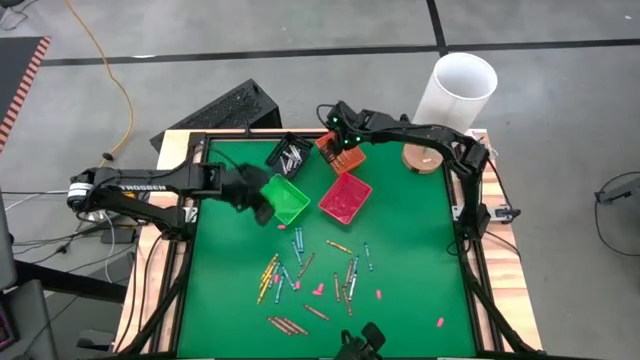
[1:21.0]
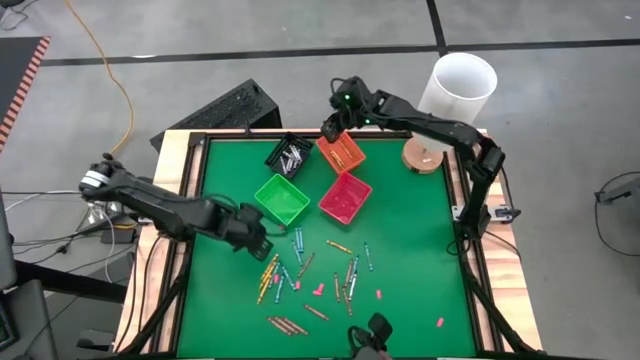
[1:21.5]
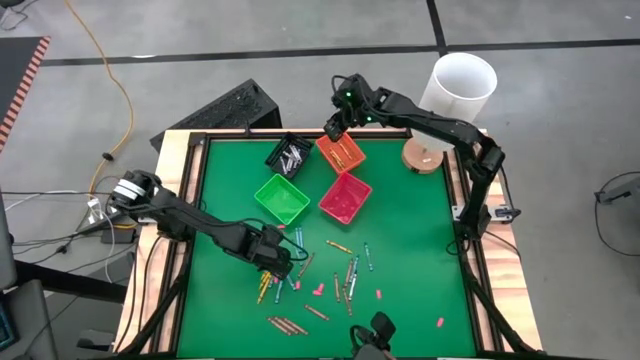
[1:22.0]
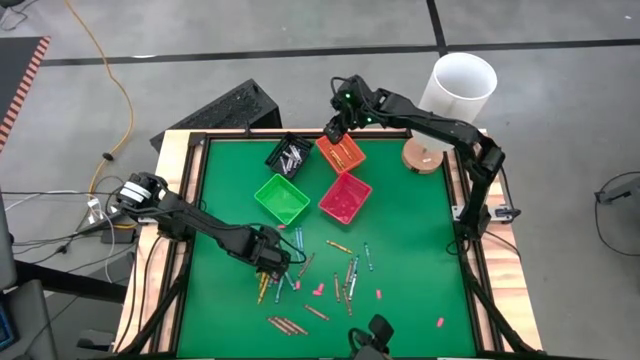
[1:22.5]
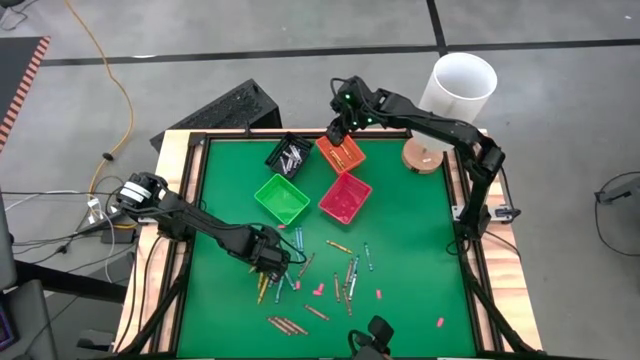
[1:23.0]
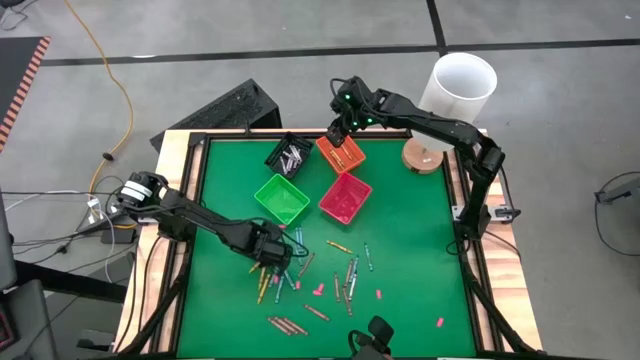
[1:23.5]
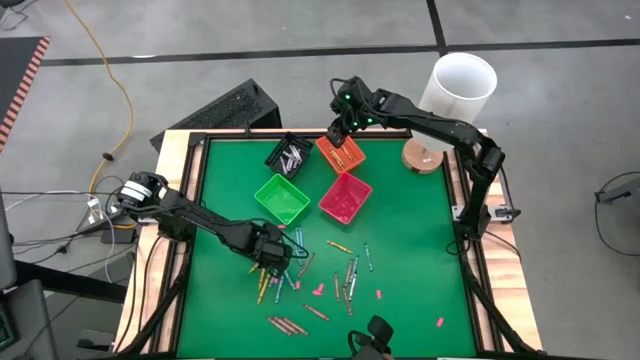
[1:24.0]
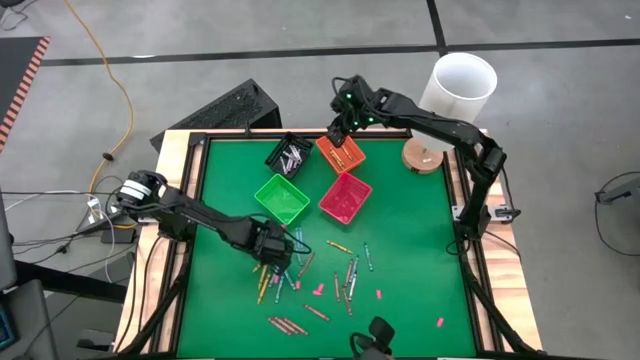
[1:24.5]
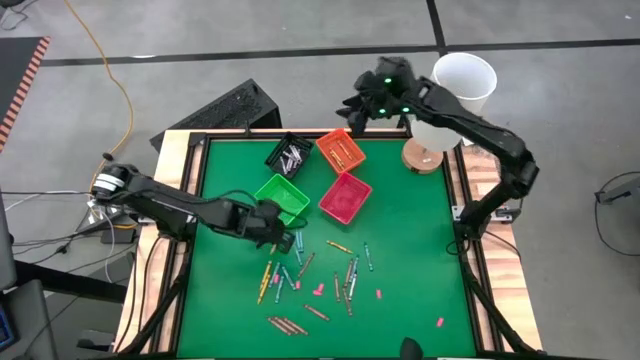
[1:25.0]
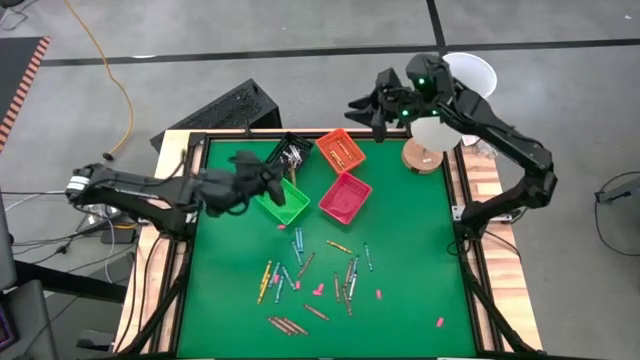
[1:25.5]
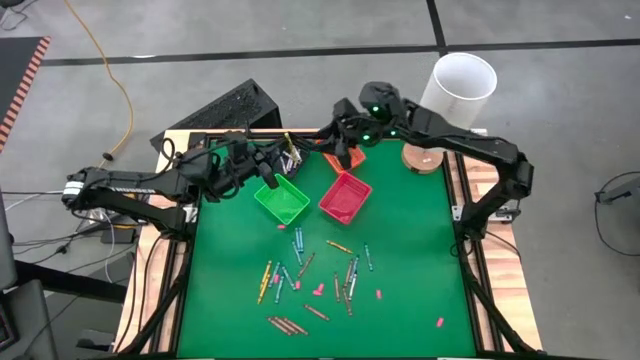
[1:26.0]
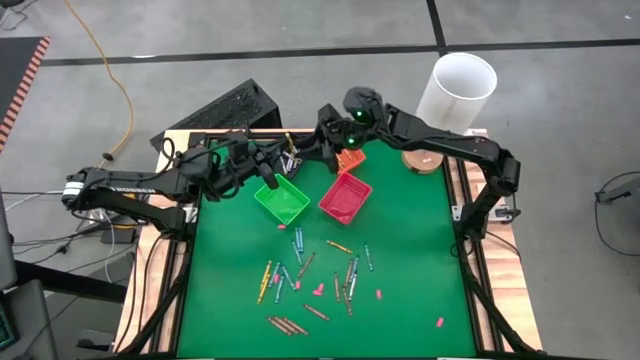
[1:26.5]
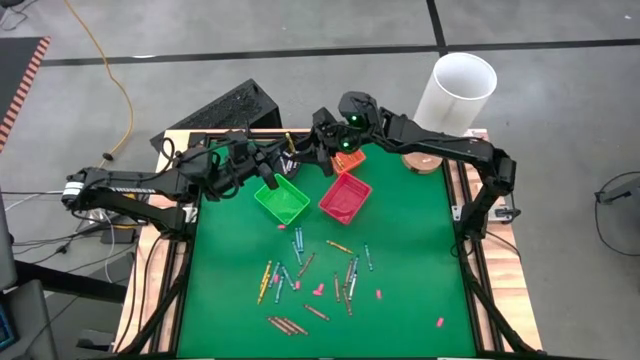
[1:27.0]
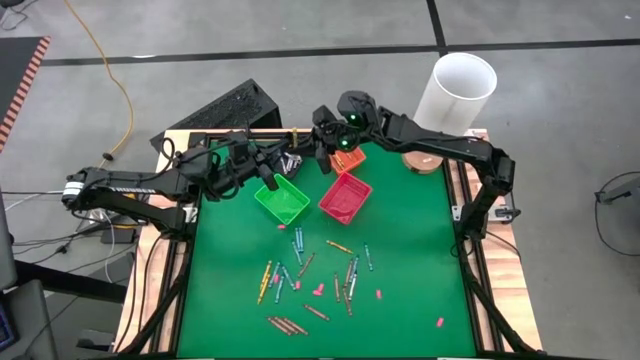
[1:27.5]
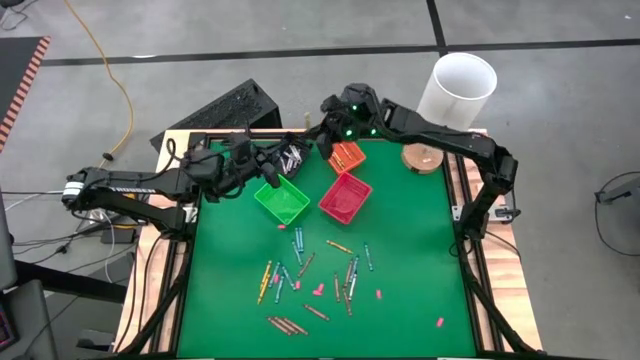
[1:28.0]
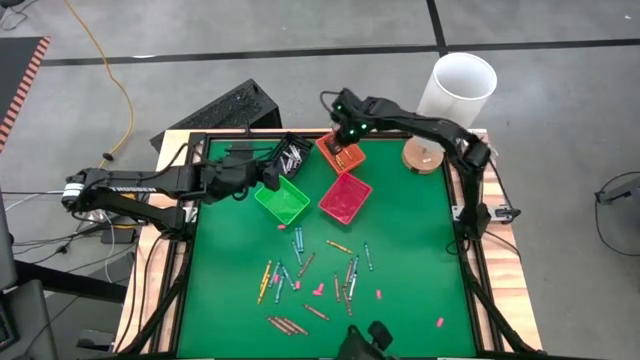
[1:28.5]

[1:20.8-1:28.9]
Task: Sort crayons
Put the yellow crayon into the bin

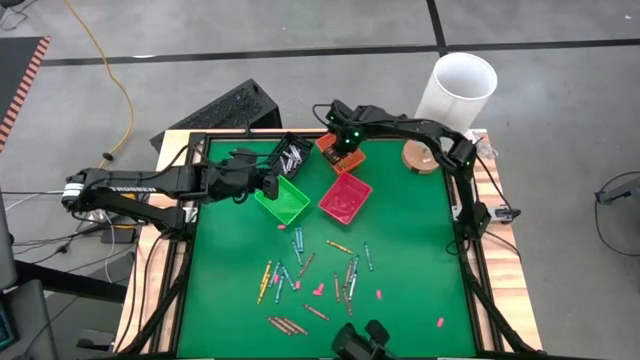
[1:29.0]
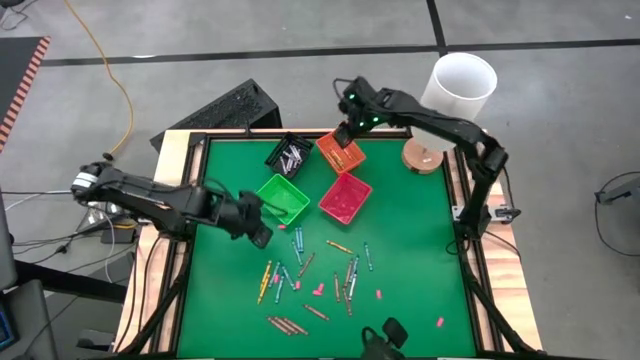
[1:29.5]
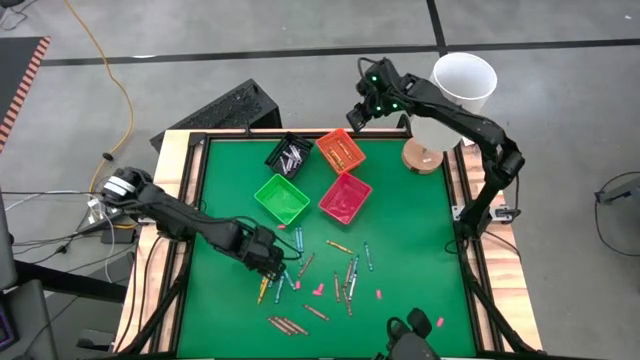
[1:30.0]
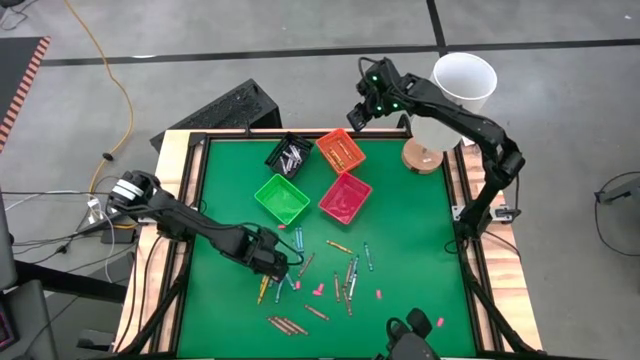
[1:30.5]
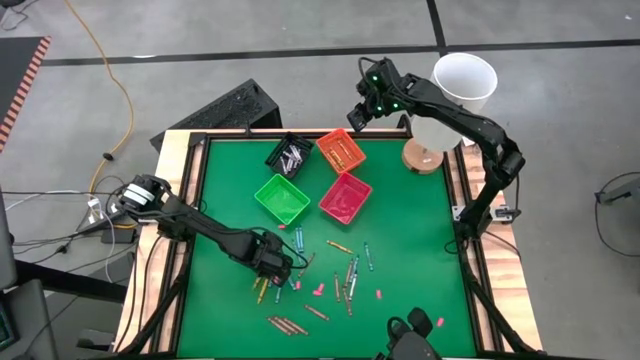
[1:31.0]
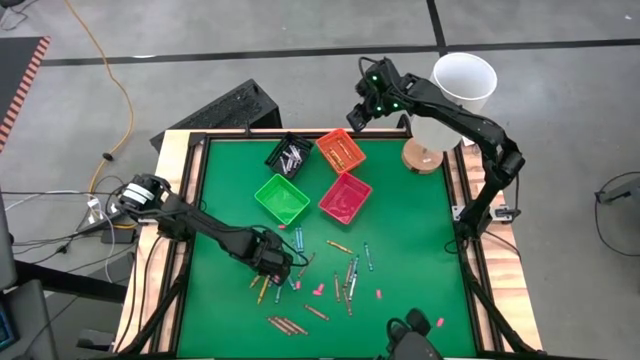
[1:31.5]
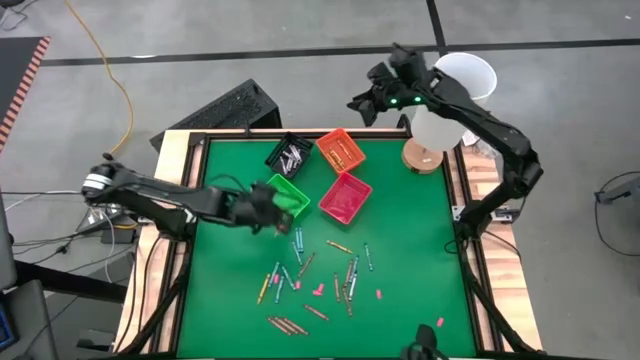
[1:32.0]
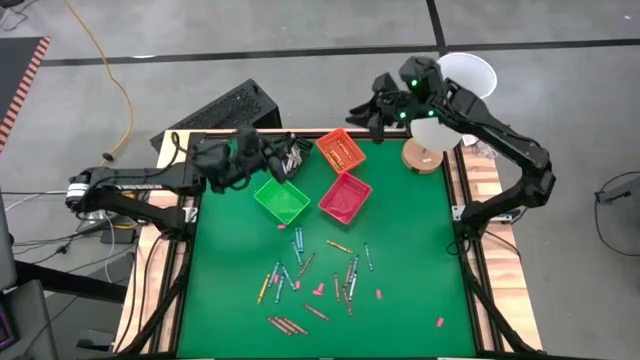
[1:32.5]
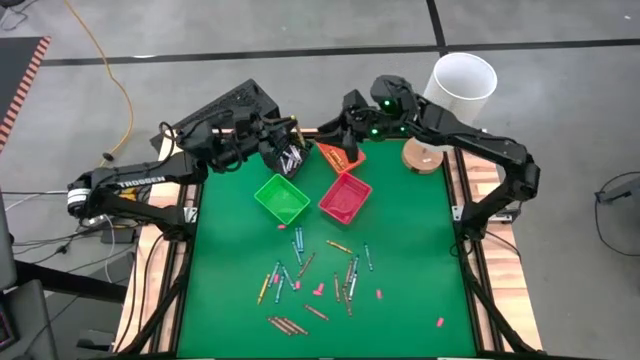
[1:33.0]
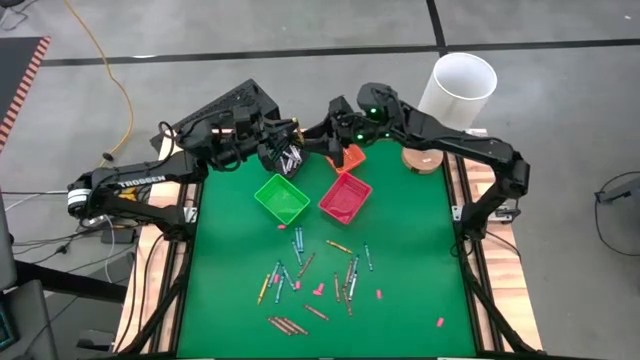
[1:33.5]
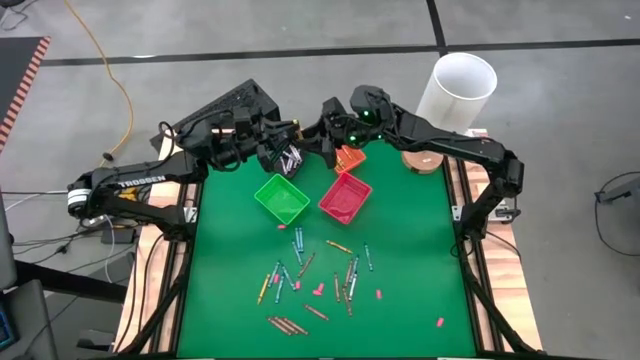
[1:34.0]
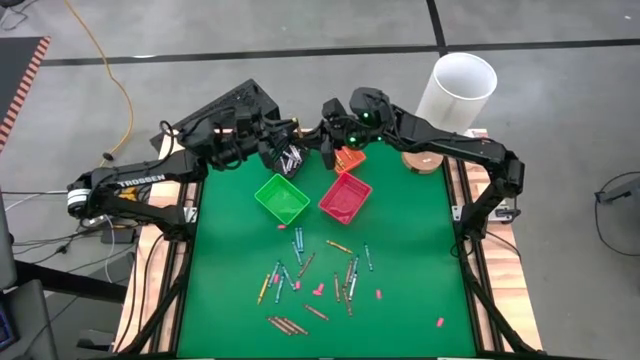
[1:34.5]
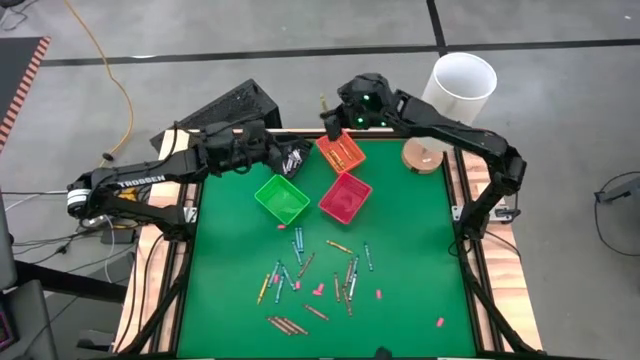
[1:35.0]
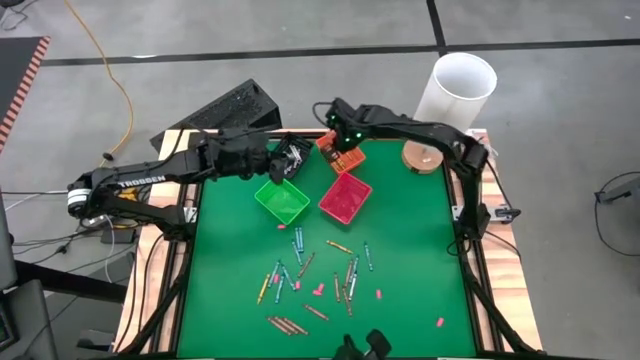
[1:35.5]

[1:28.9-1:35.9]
Put the yellow crayon into the bin

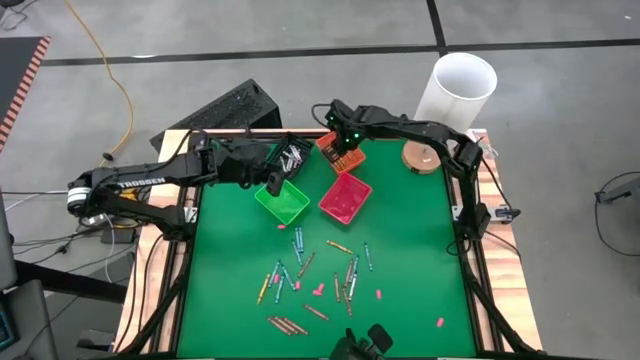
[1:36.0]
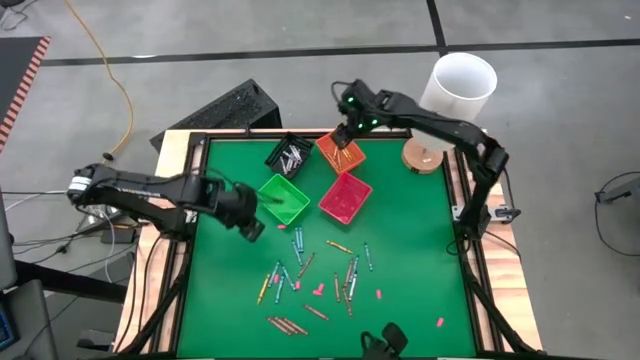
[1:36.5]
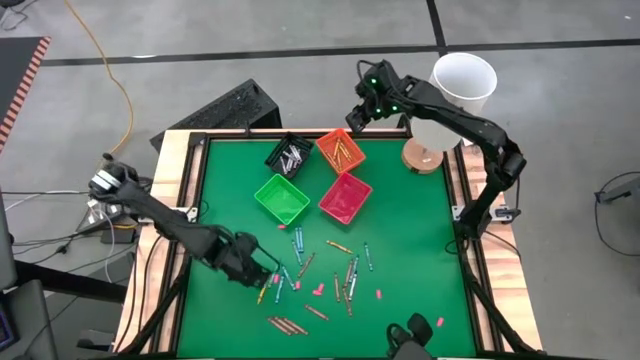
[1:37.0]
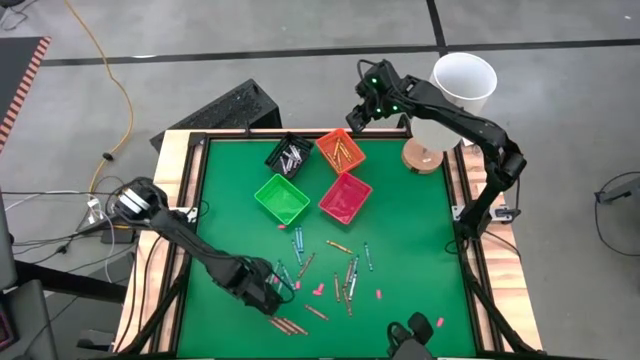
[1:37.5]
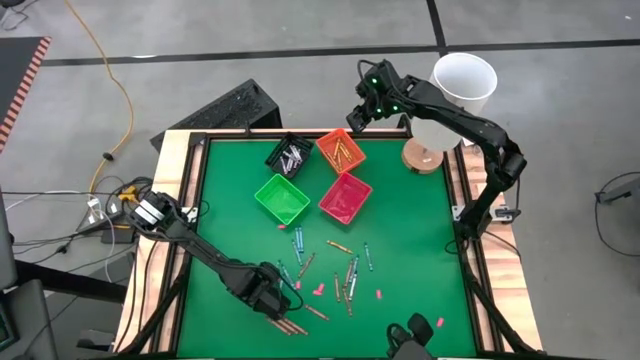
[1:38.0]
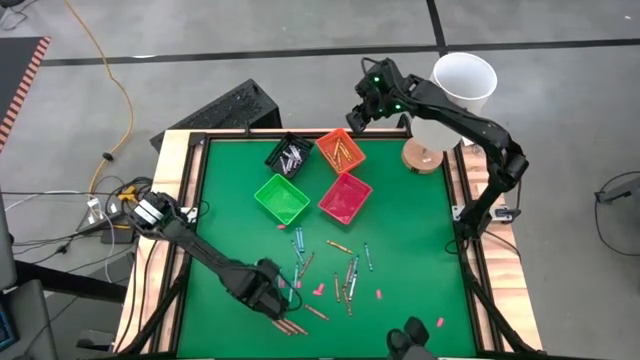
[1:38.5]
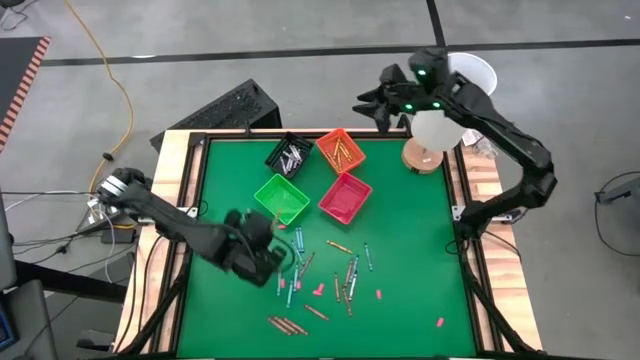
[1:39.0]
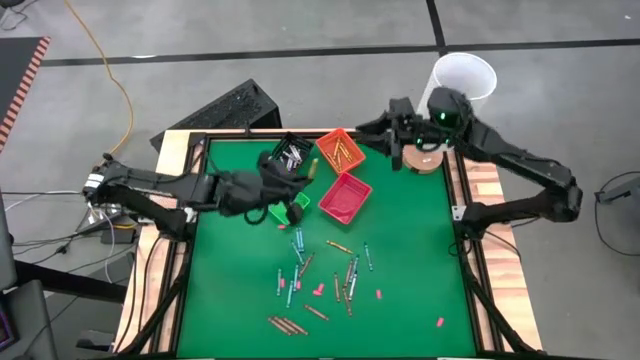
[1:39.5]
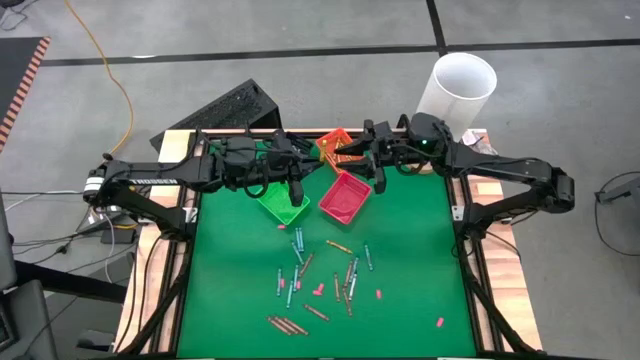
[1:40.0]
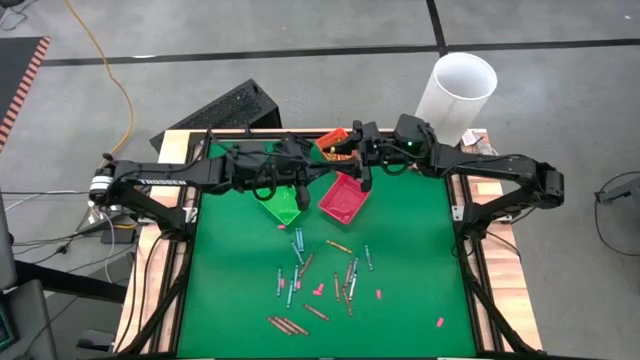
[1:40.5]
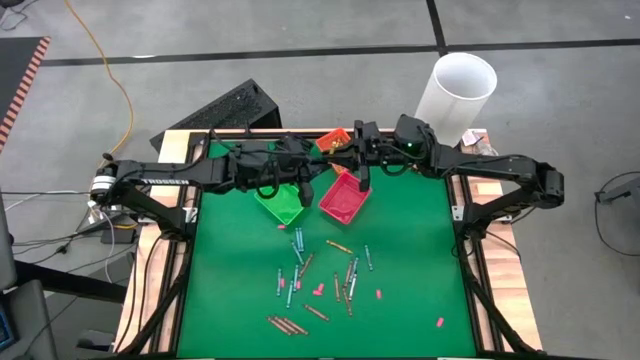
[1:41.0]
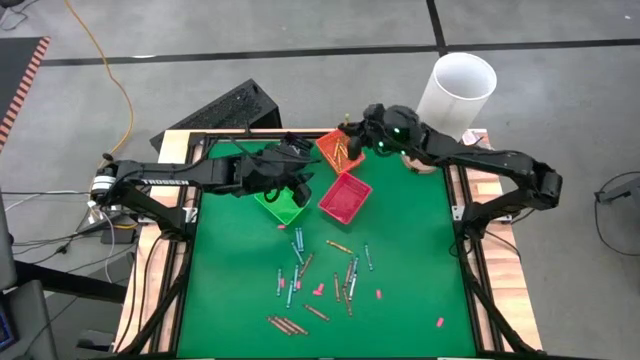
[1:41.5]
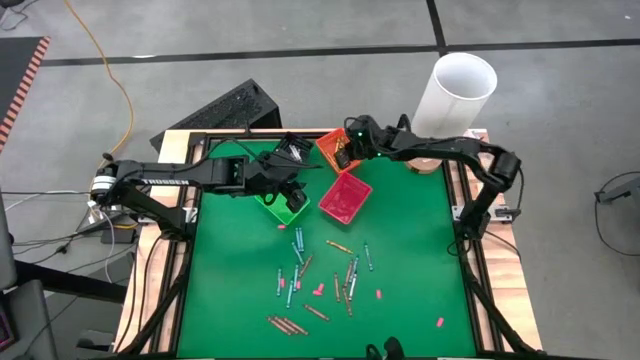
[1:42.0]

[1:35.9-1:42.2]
Put the yellow crayon into the bin
